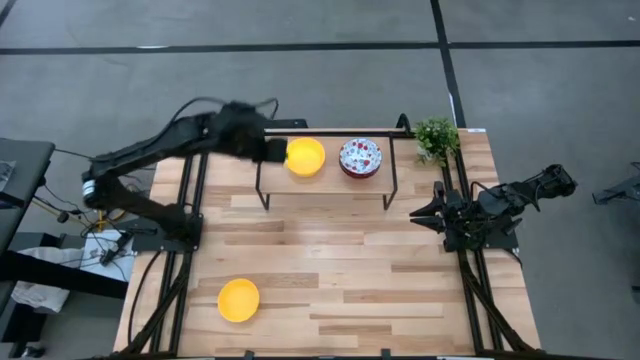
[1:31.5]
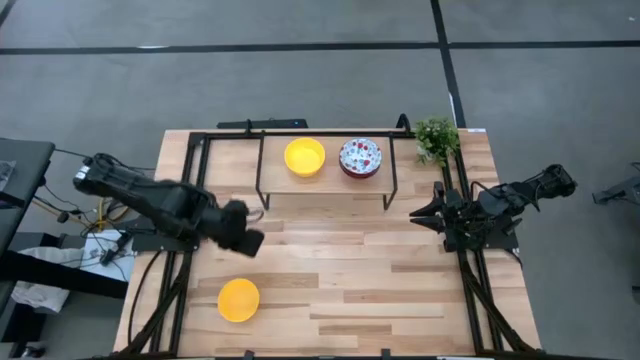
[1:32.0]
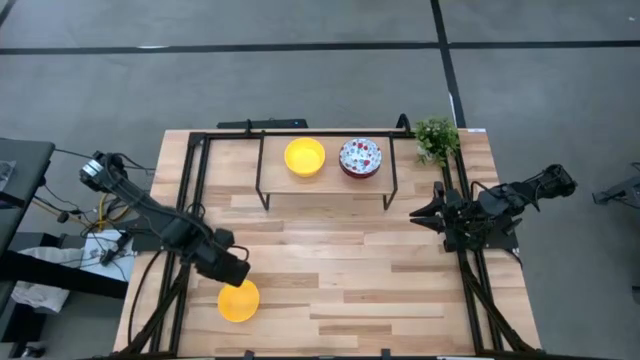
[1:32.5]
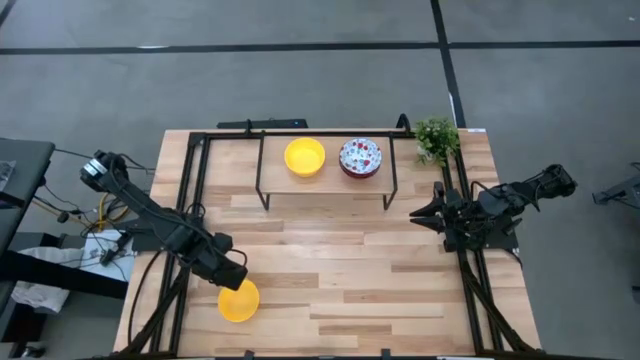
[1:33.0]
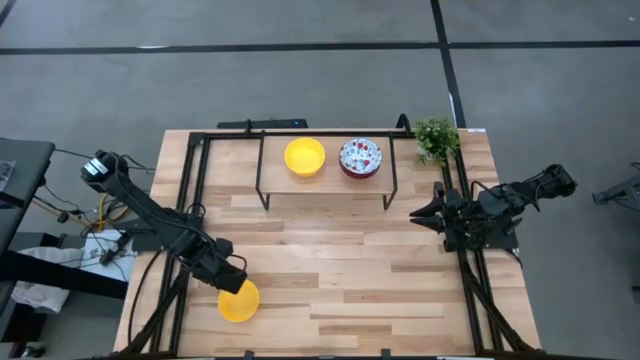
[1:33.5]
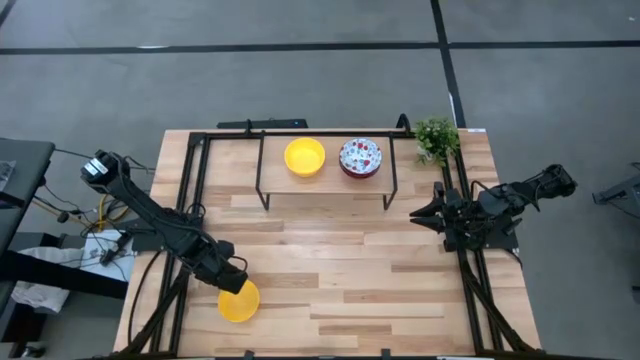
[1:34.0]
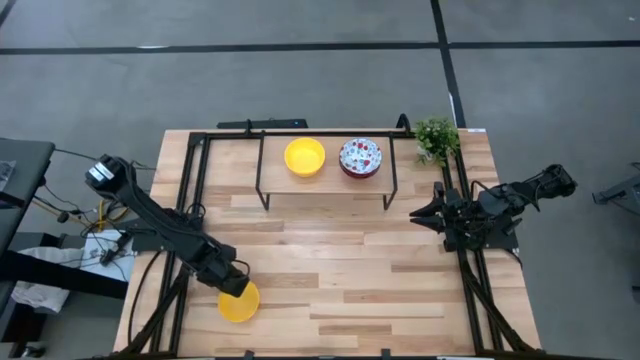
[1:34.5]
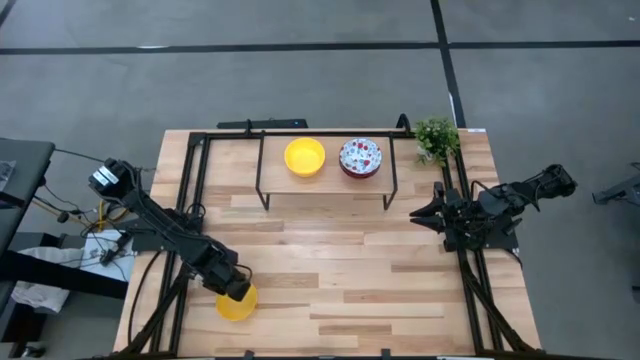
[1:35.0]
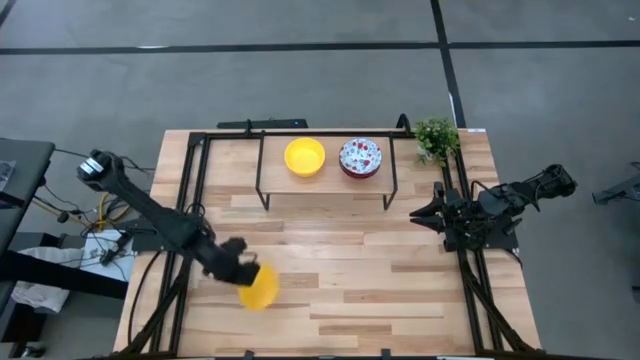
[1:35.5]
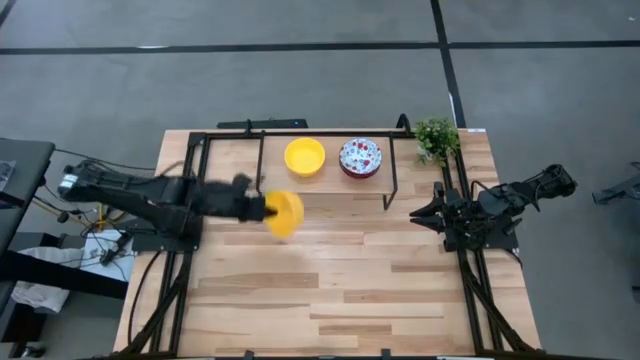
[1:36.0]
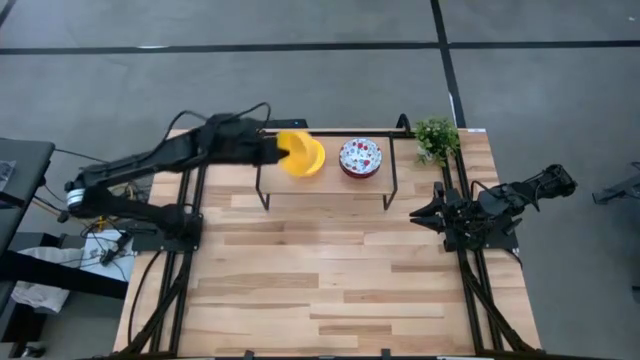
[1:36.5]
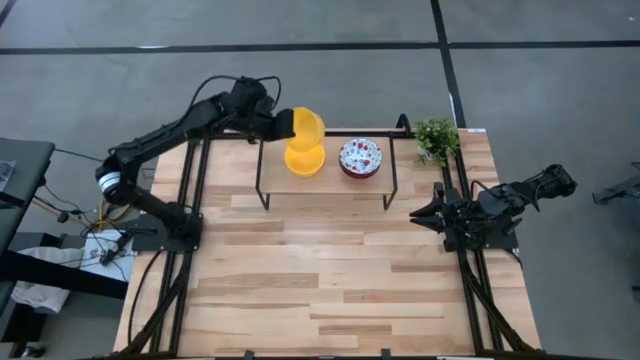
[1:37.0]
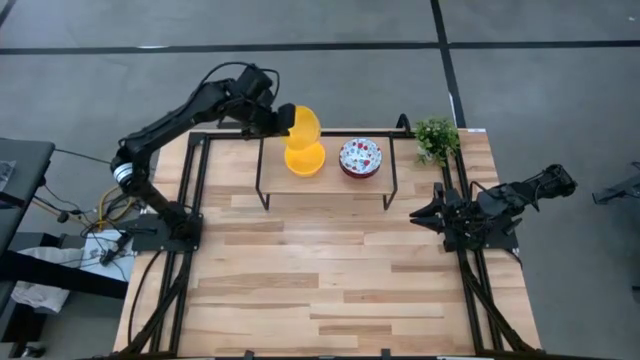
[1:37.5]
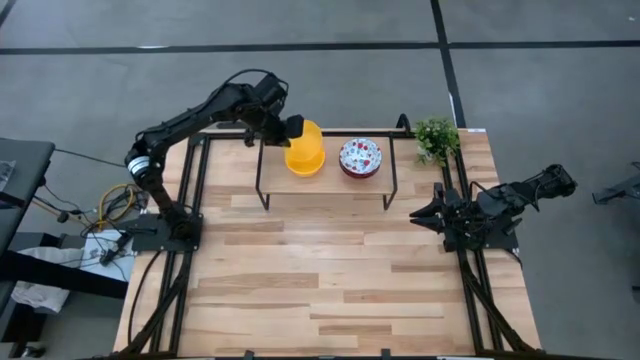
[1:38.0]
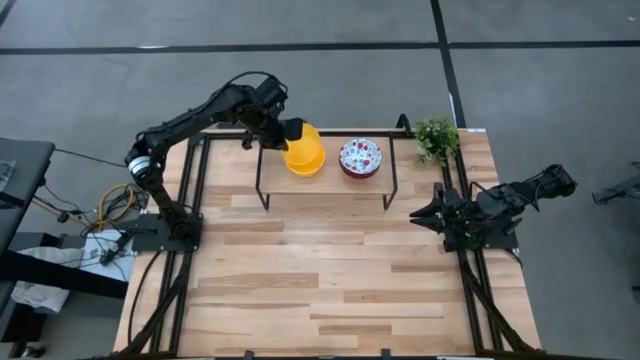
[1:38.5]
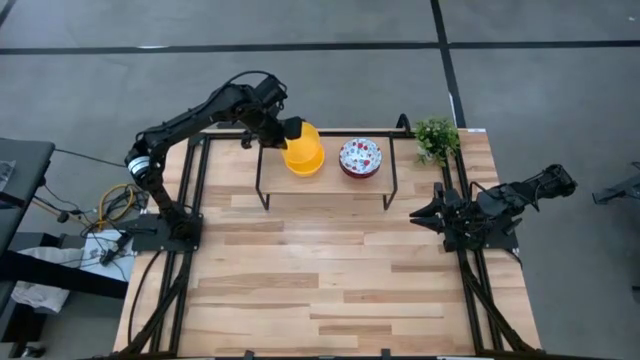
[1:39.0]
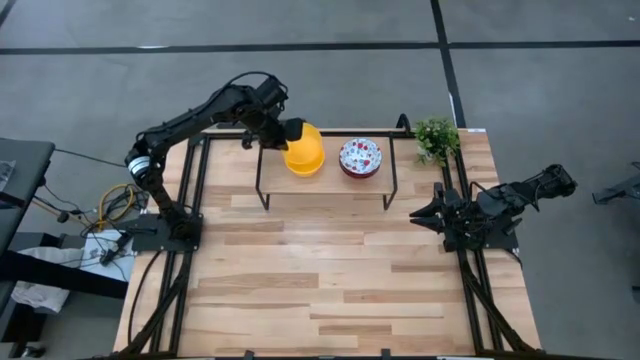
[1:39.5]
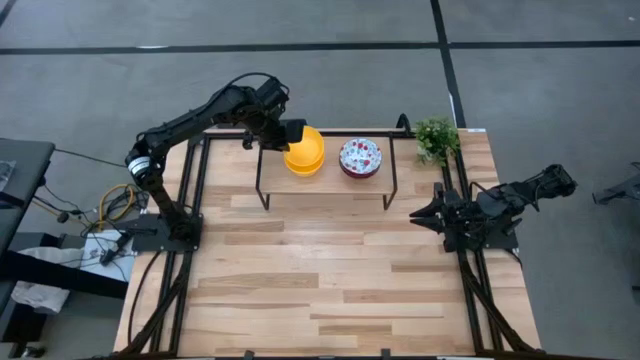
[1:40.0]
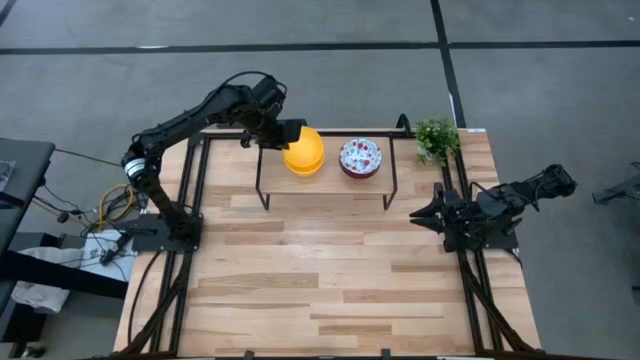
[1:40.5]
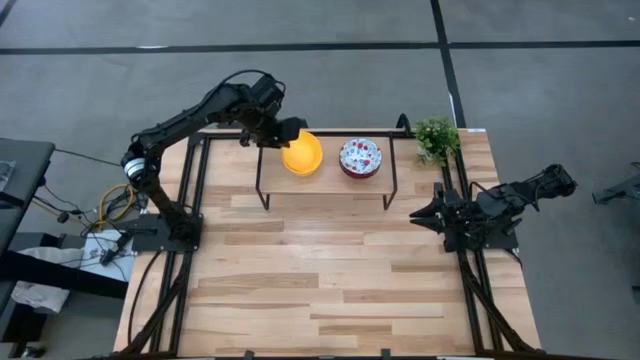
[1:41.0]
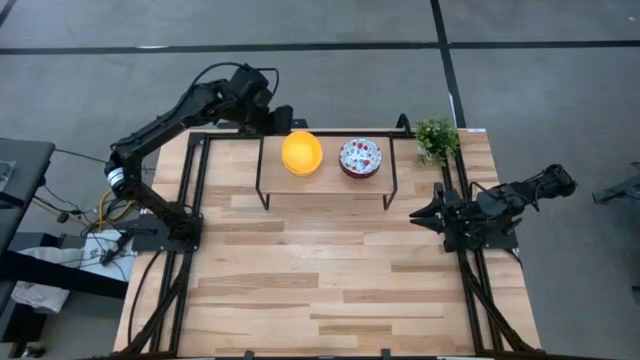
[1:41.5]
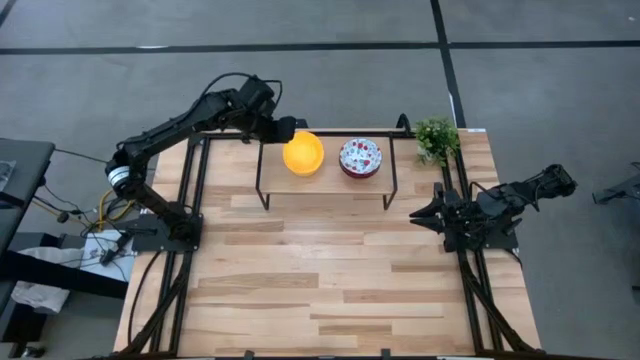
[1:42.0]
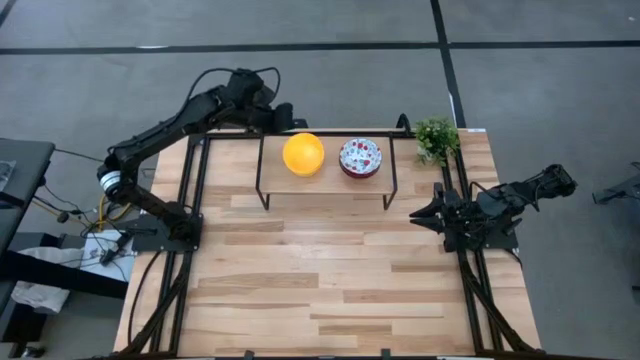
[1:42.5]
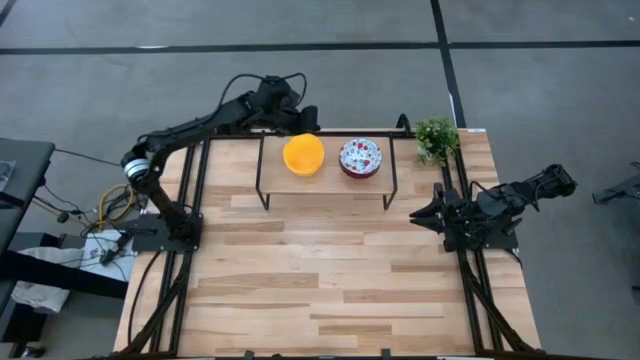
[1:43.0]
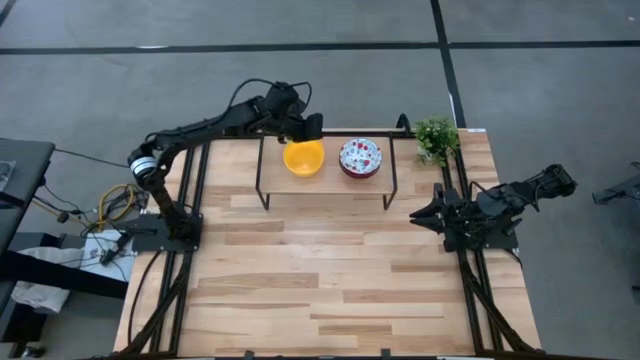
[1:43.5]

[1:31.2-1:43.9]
Task: Pick & Place Mini bowls
Stack the yellow bowl on the yellow bowls on the shelf

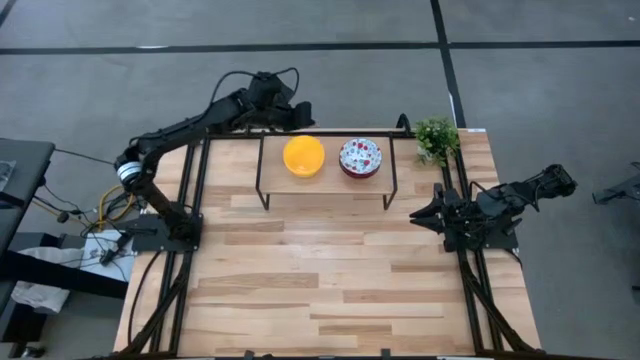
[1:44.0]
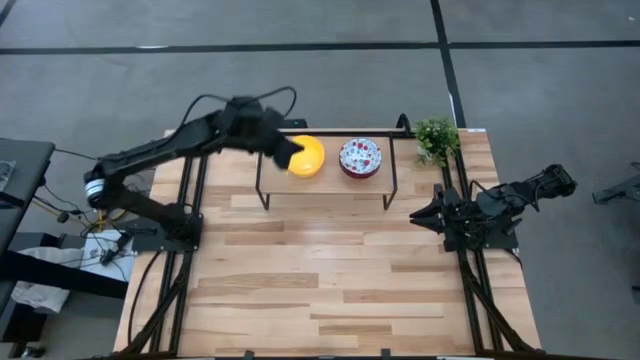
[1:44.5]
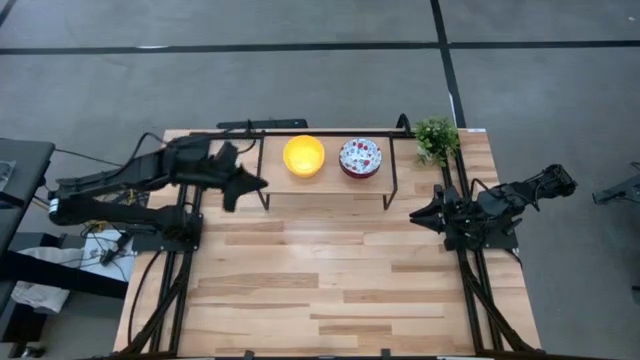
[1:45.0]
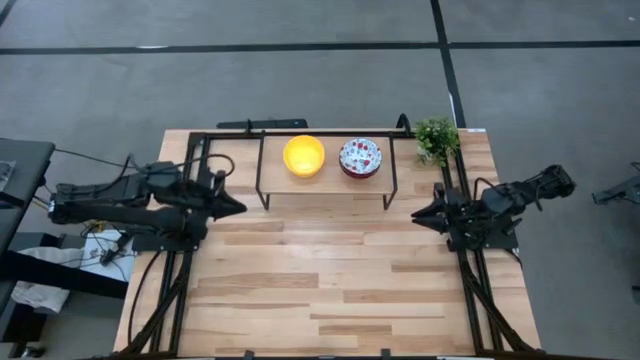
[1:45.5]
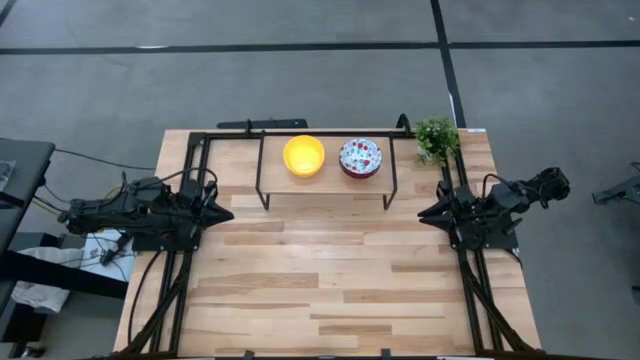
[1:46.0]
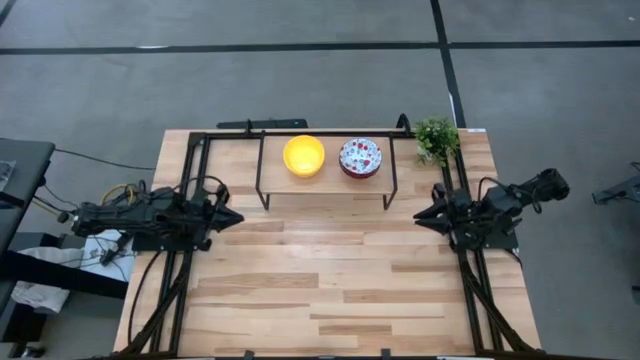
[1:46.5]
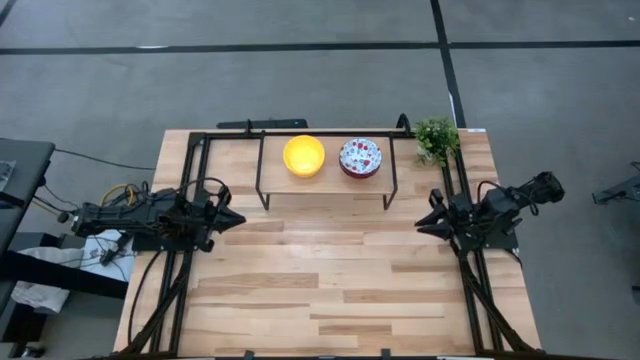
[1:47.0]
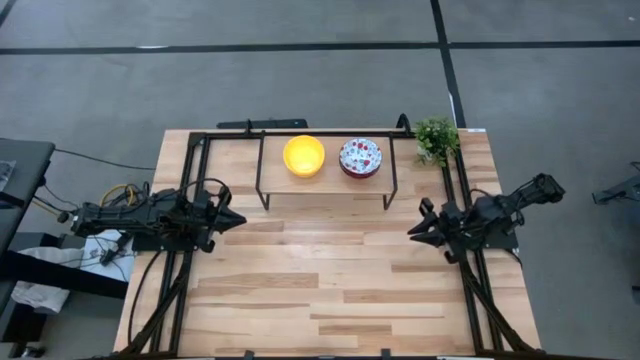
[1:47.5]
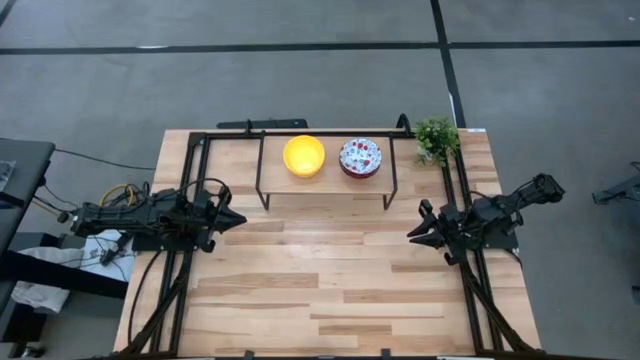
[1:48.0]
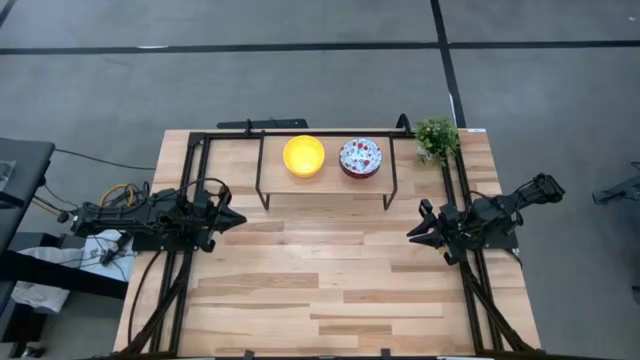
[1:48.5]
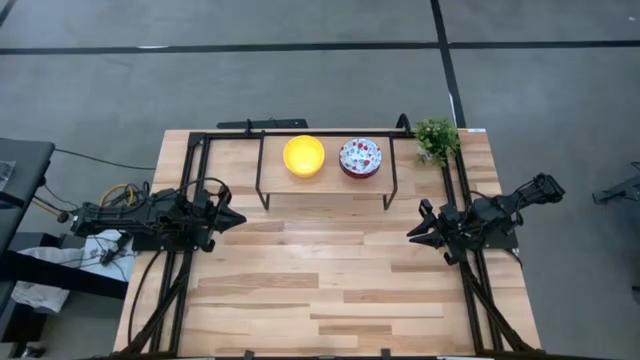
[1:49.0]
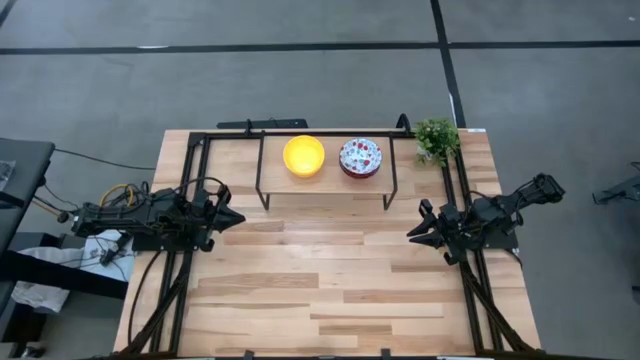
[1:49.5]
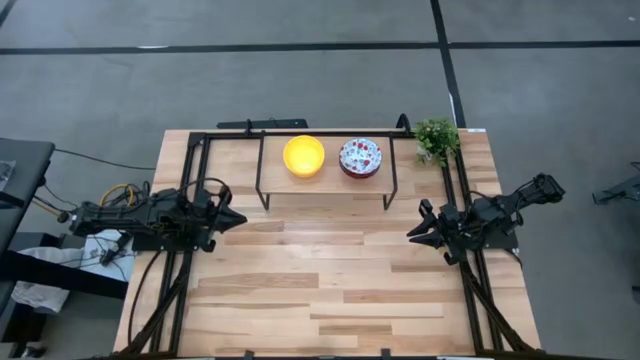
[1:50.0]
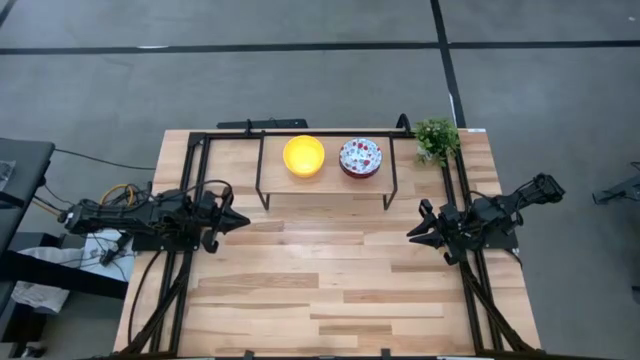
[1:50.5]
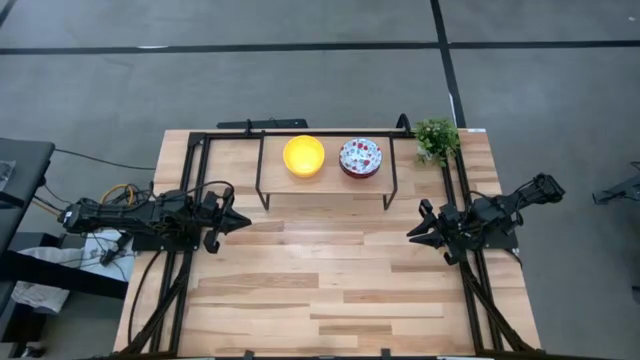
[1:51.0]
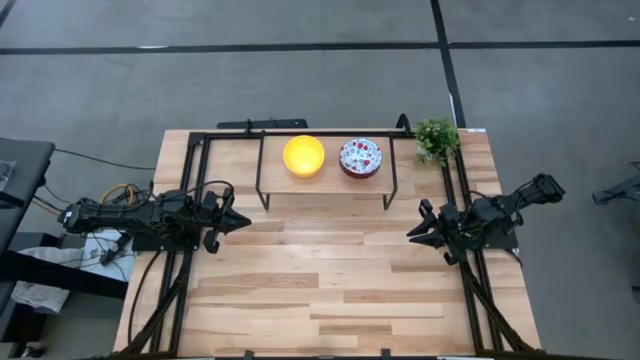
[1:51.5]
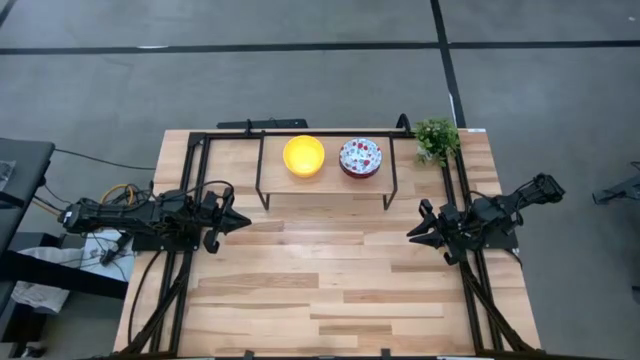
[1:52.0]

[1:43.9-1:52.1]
Return to Home Position
